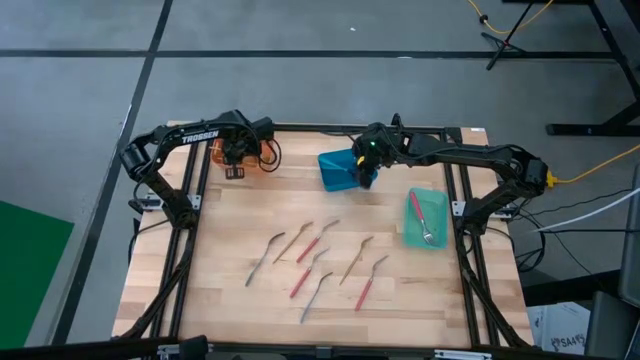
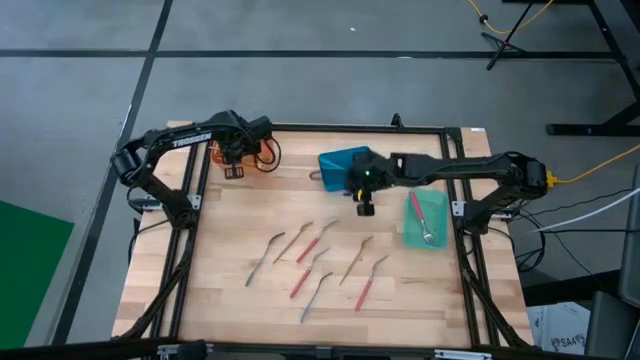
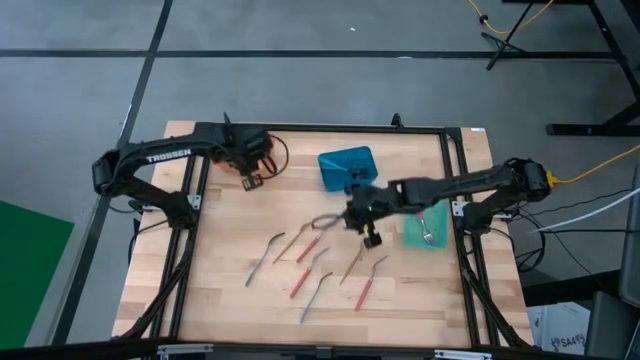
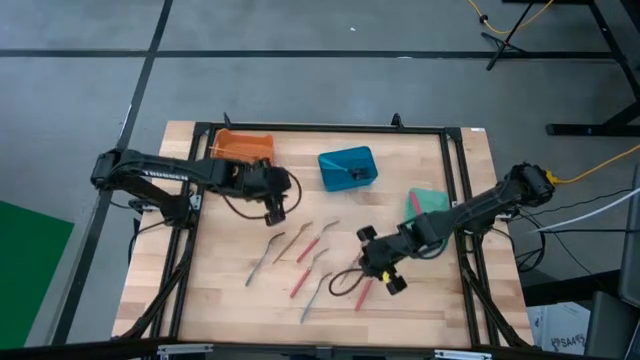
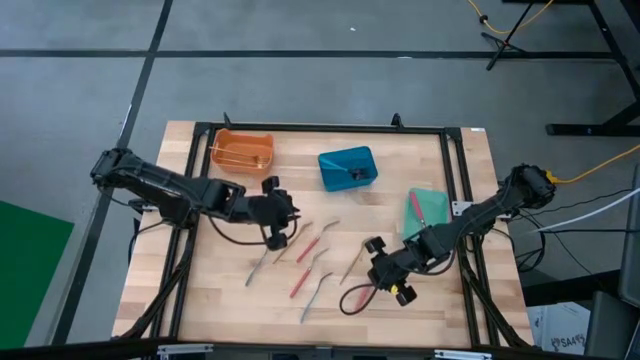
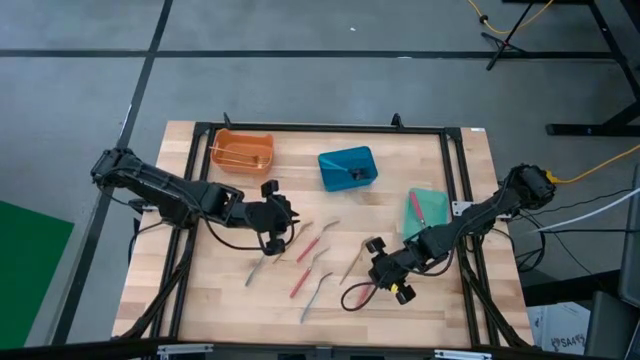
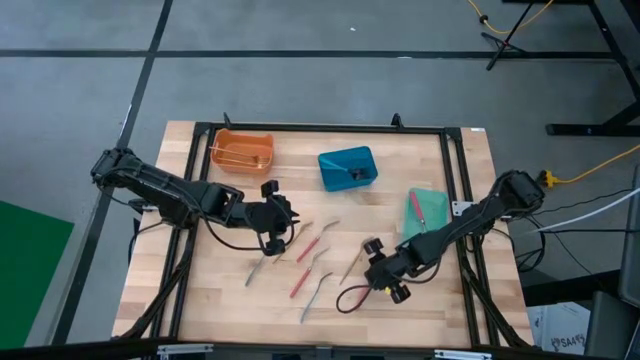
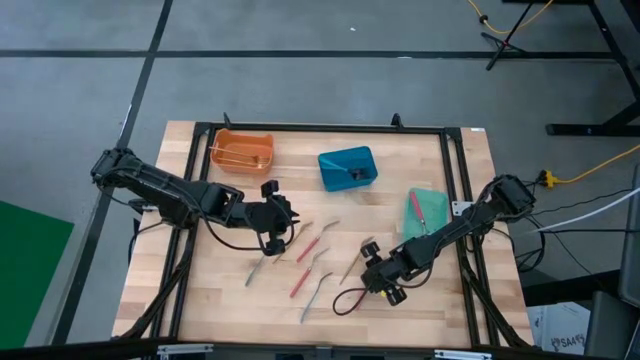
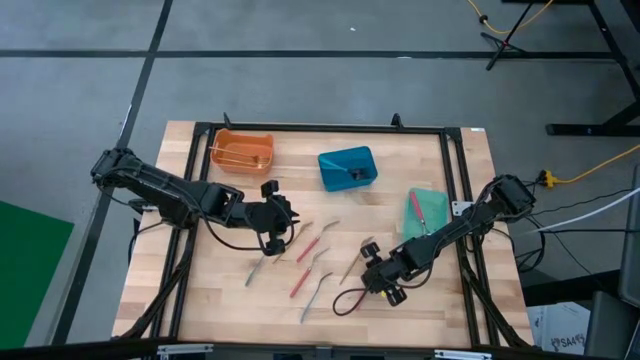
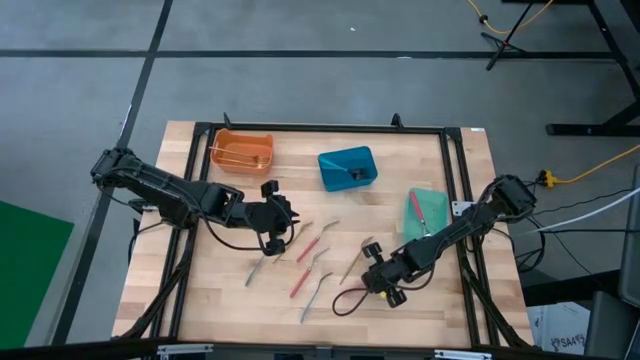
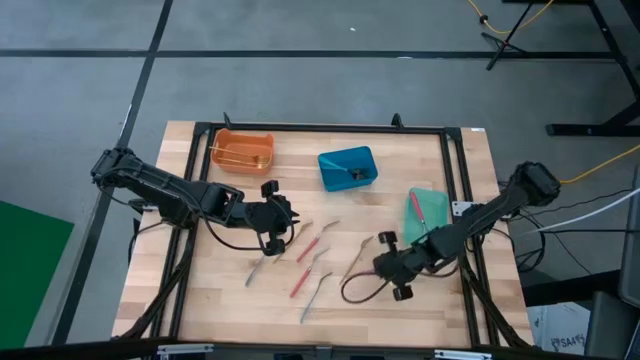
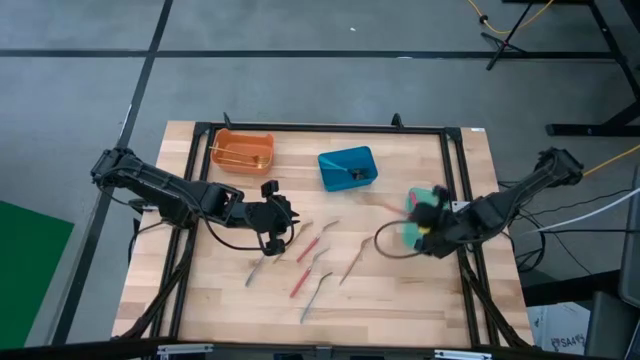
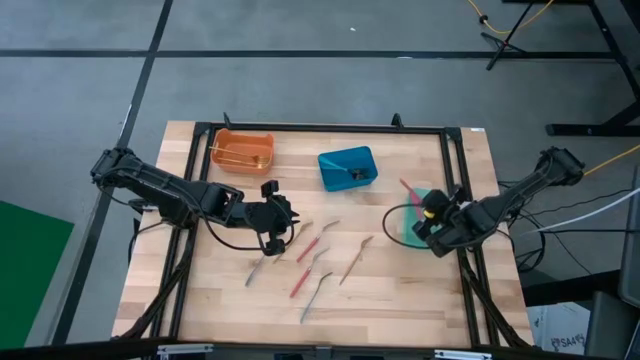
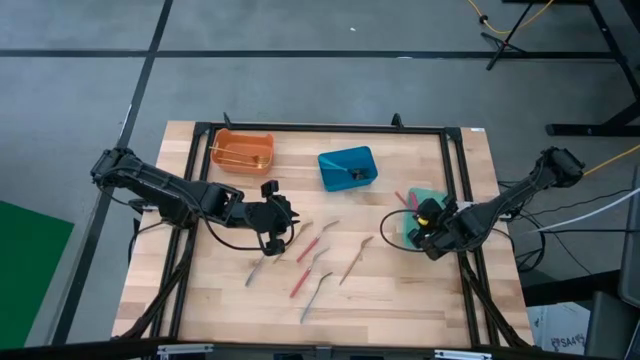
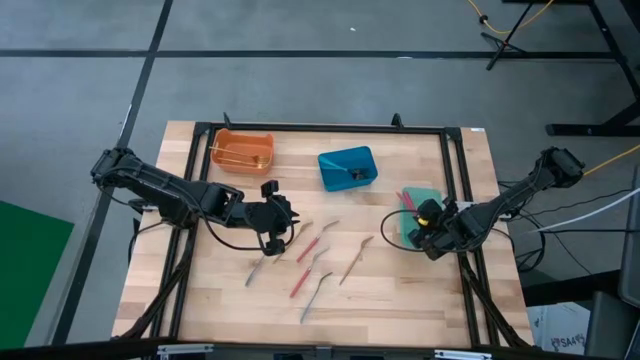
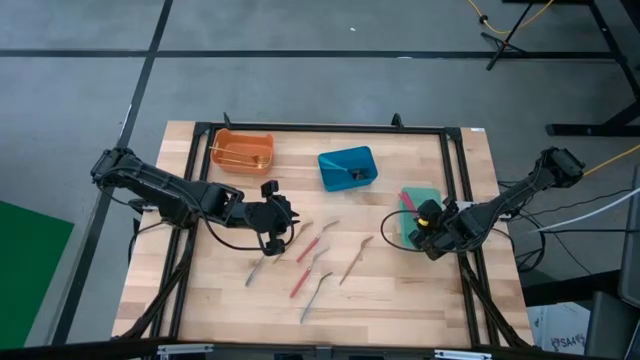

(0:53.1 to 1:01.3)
Task: Sort silverware by color (type)
Put the pink fork into the green bin

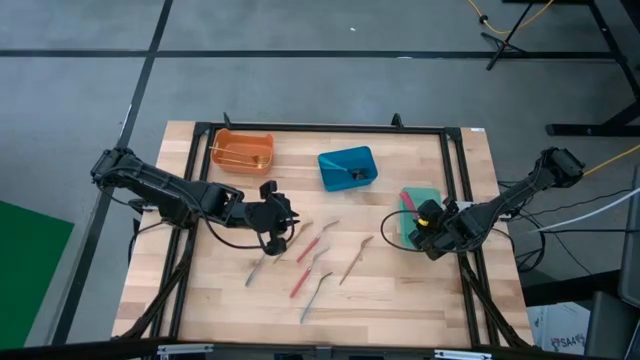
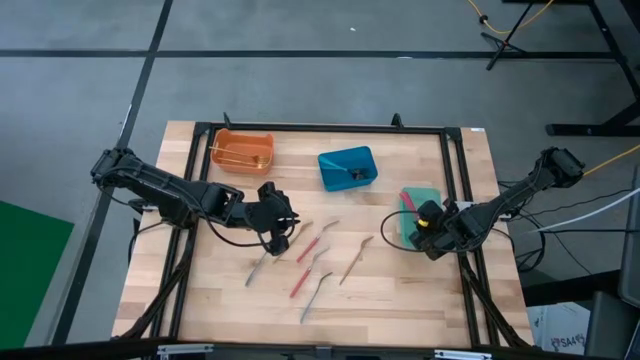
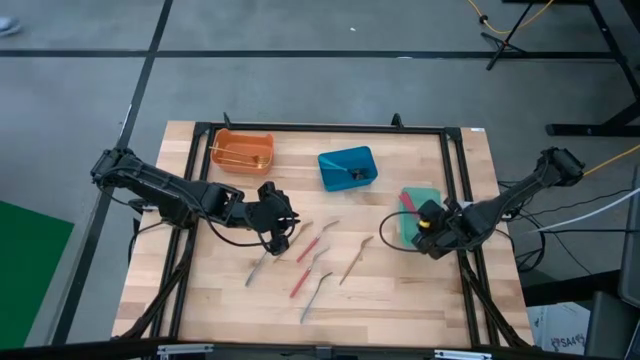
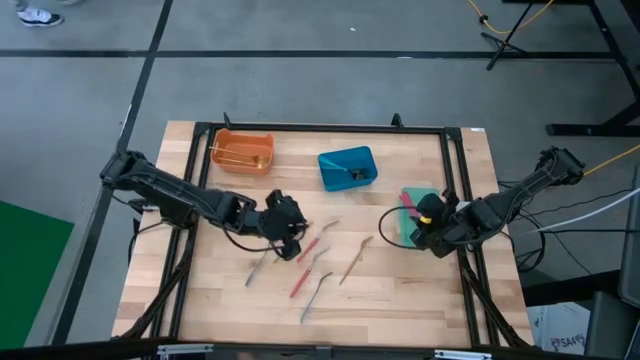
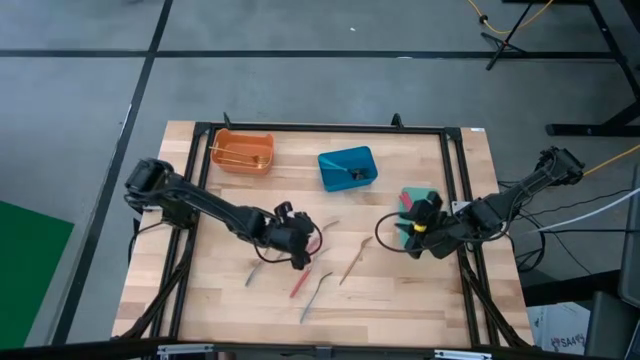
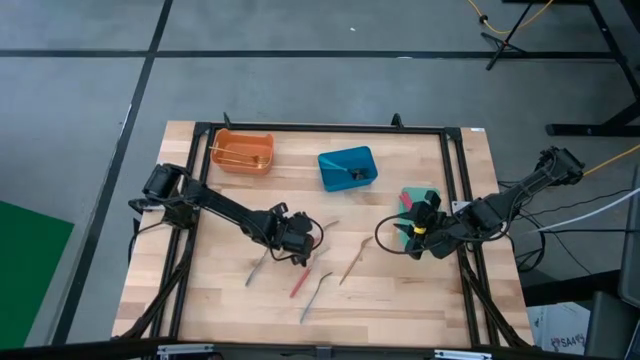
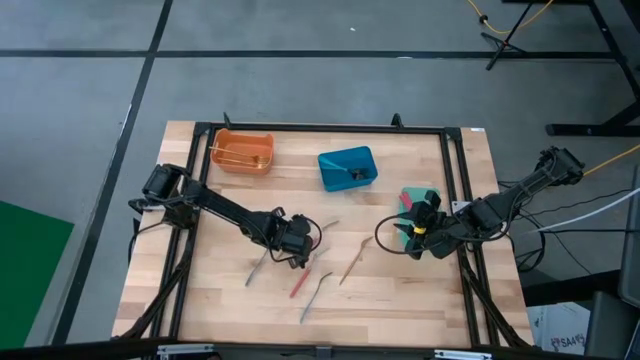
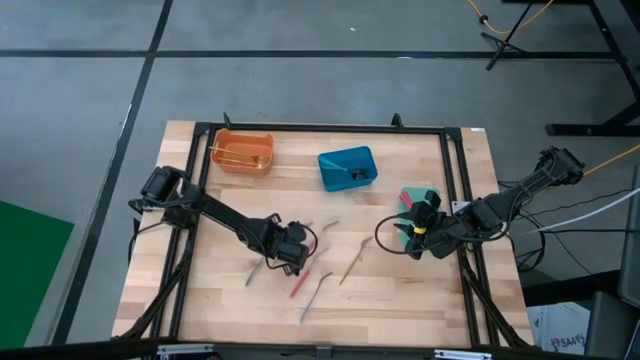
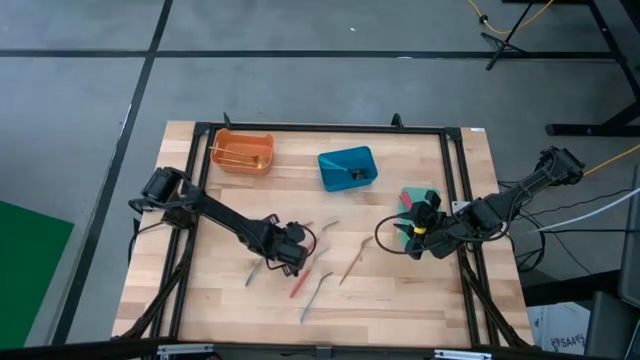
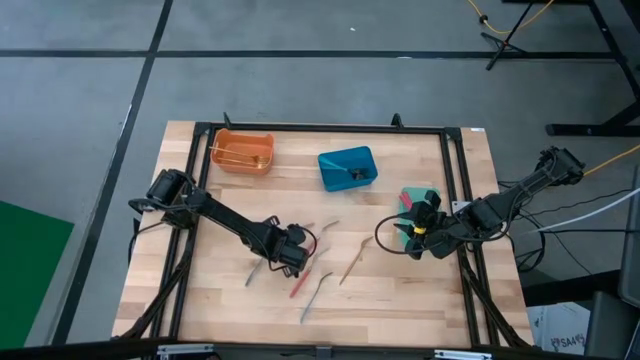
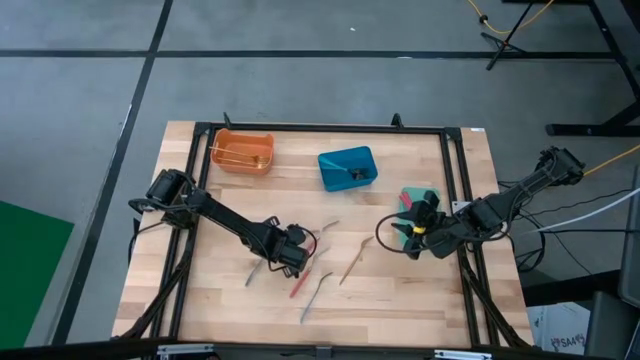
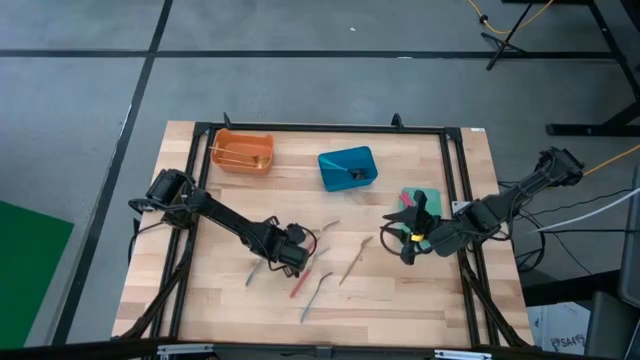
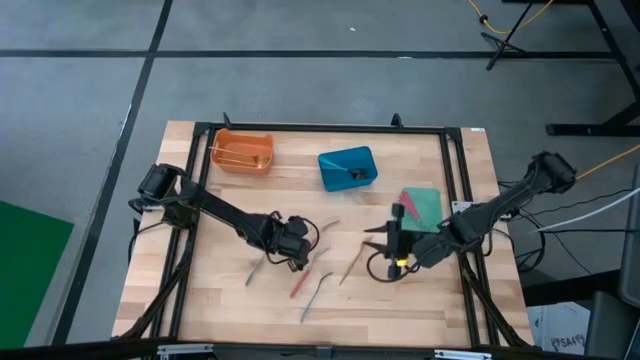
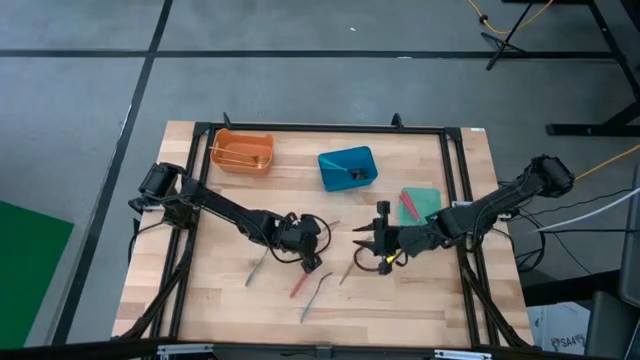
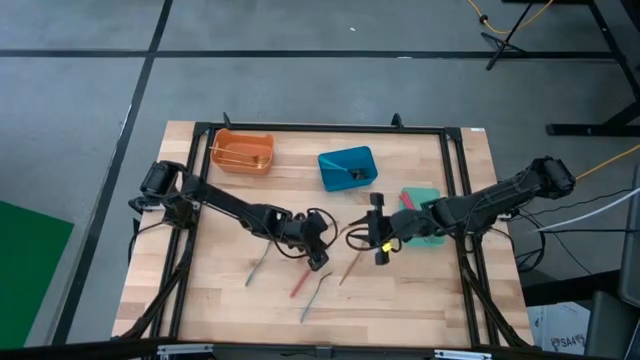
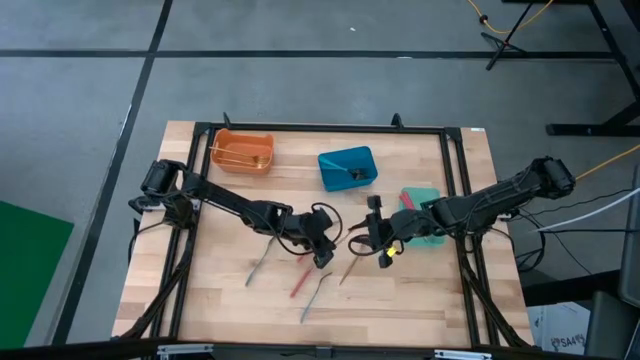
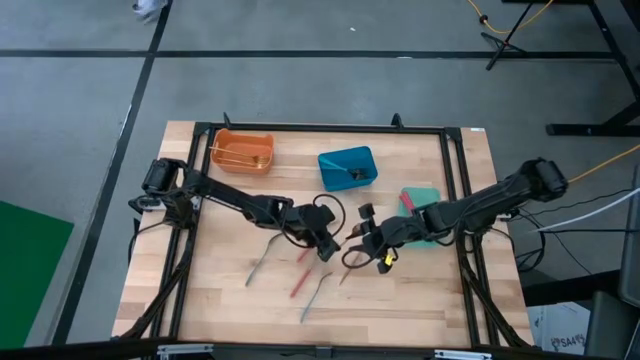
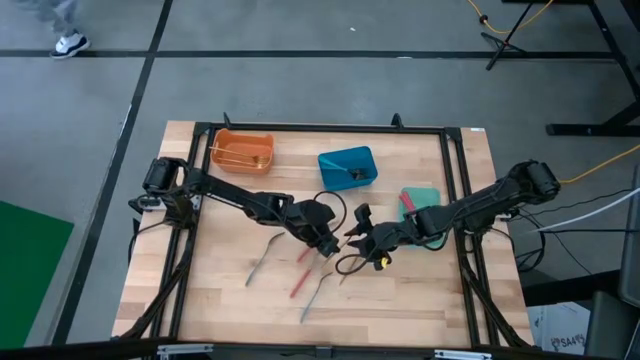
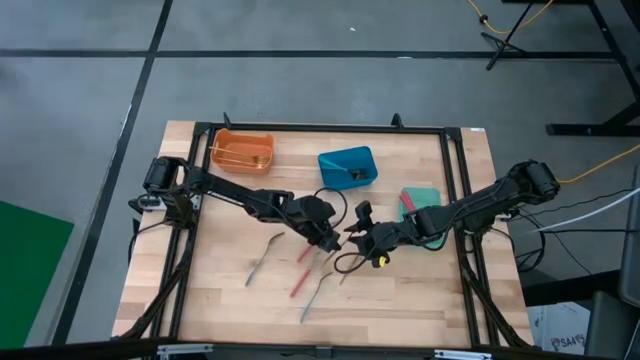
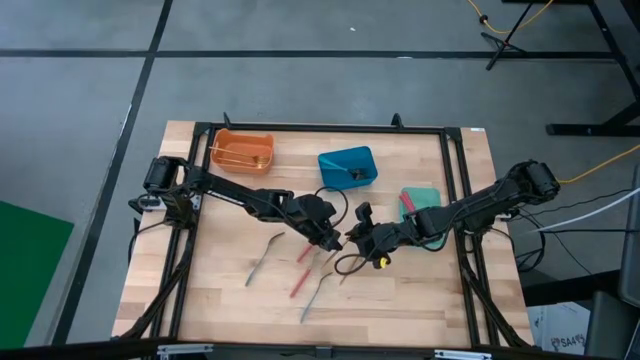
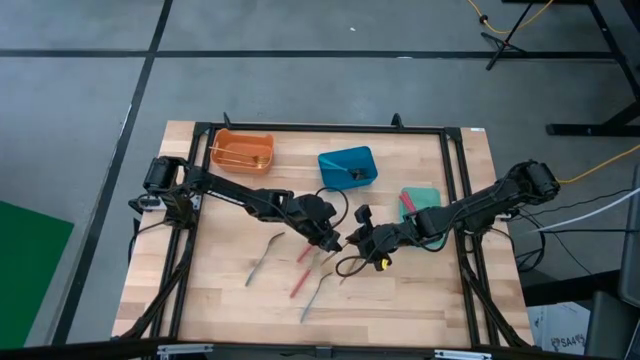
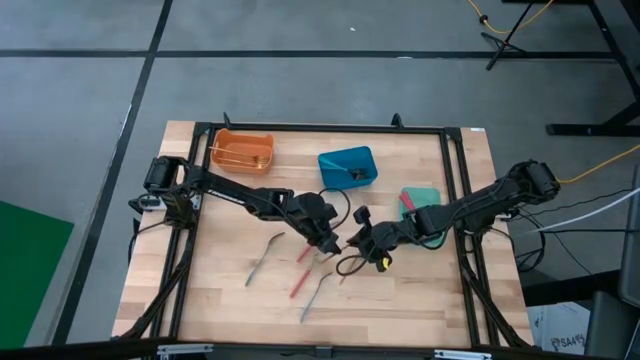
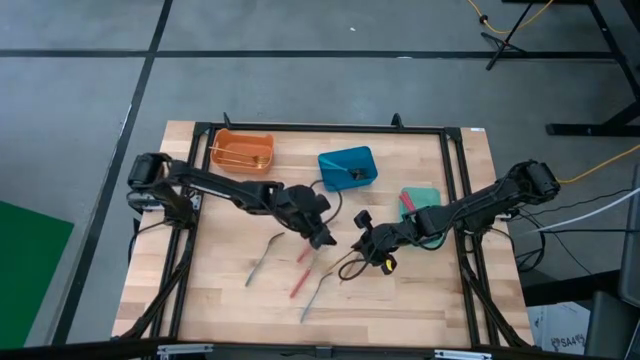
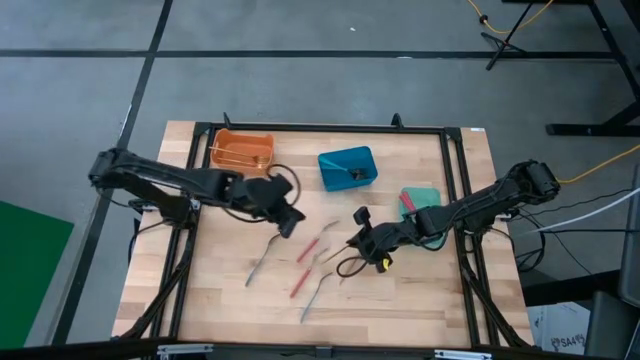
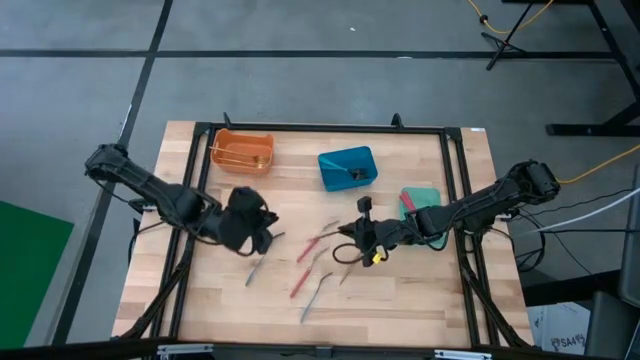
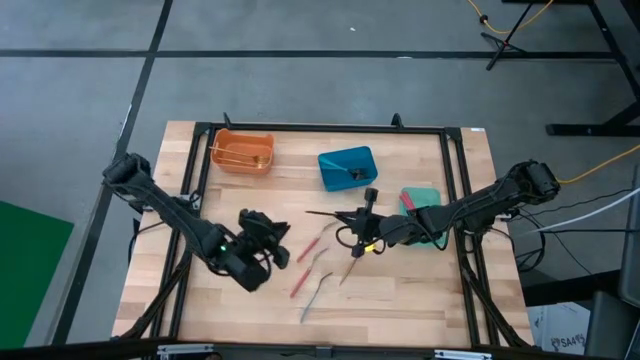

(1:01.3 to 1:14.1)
Put the gold fork into the orange bin

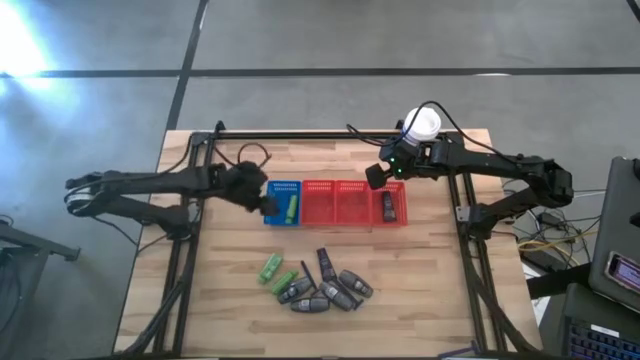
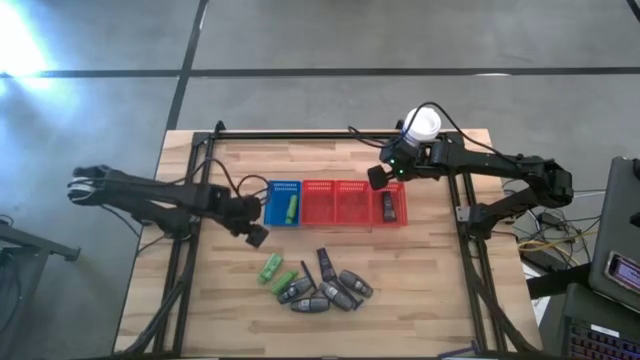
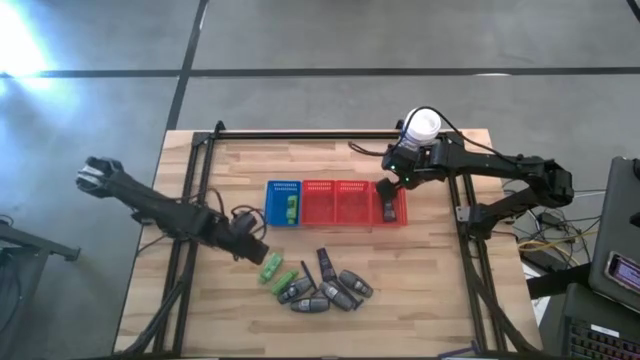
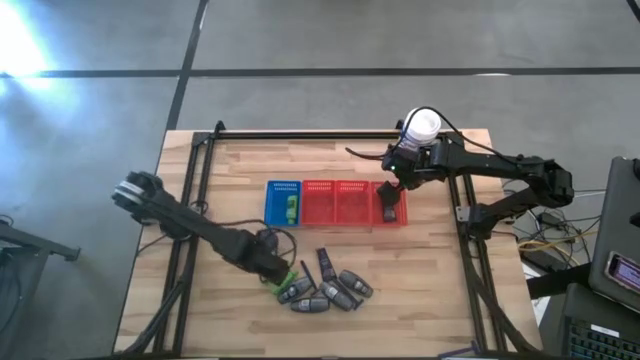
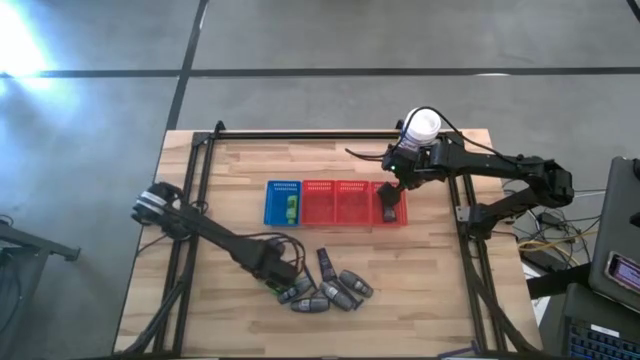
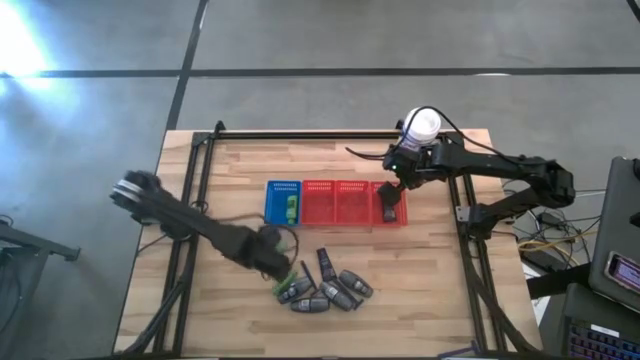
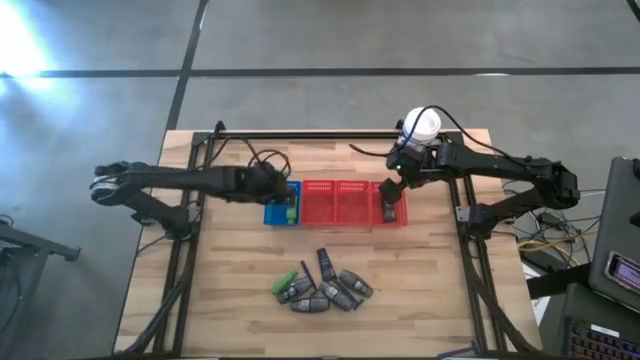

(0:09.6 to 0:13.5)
Task: Pick & Place Travel size toiletries
Put the green shampoo into the blue bin
